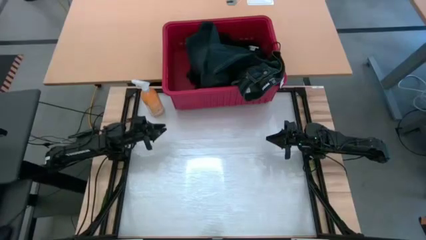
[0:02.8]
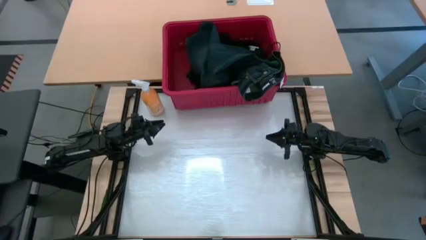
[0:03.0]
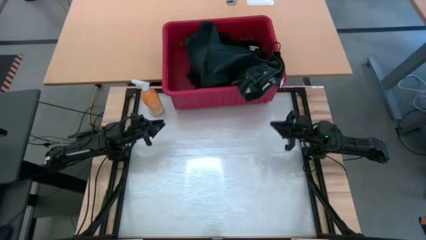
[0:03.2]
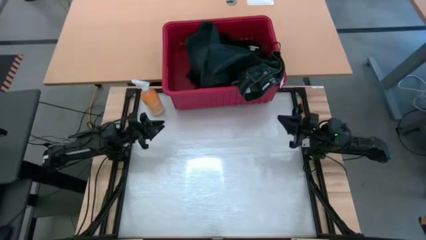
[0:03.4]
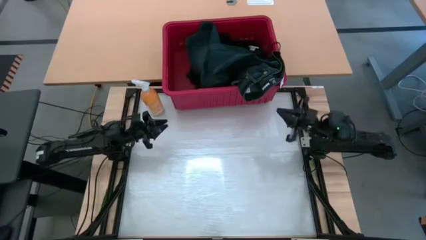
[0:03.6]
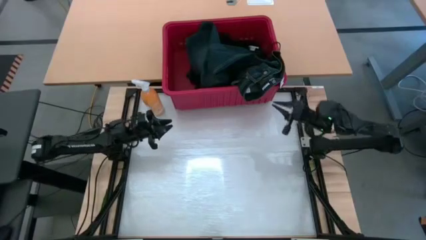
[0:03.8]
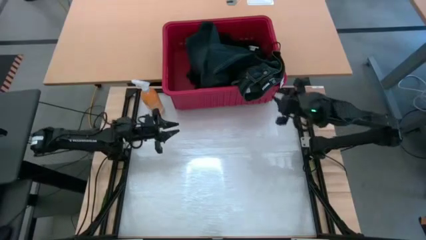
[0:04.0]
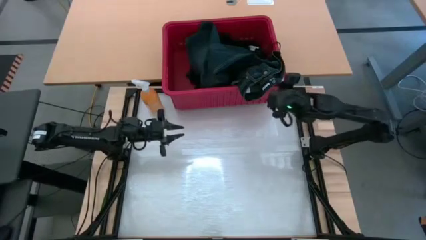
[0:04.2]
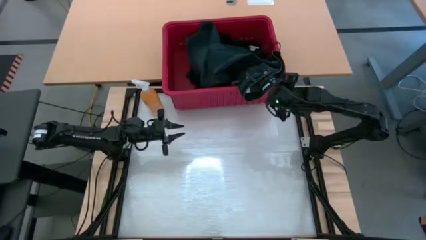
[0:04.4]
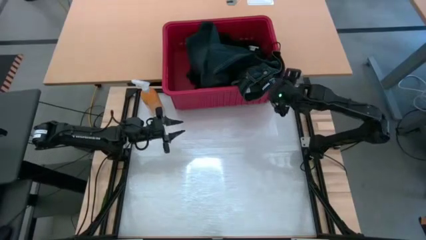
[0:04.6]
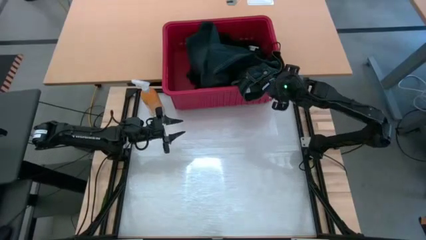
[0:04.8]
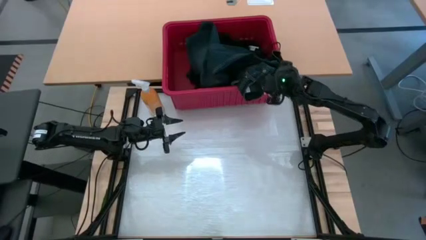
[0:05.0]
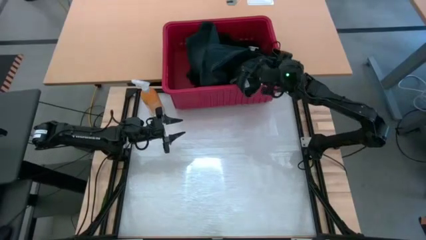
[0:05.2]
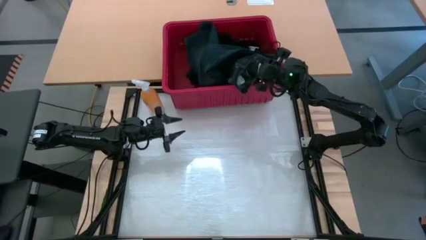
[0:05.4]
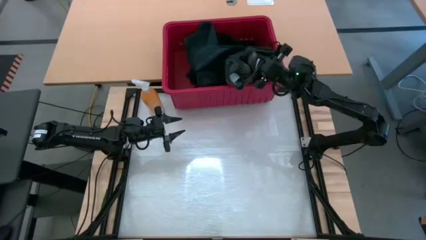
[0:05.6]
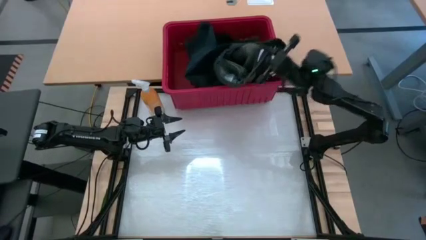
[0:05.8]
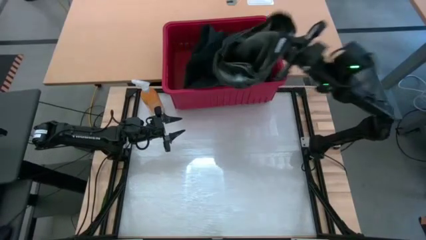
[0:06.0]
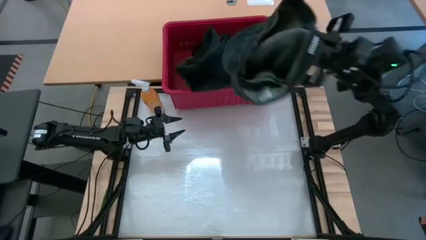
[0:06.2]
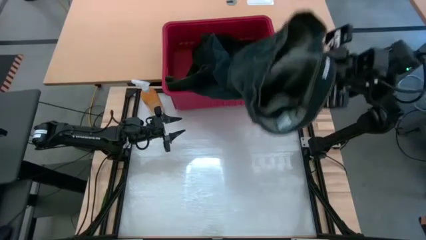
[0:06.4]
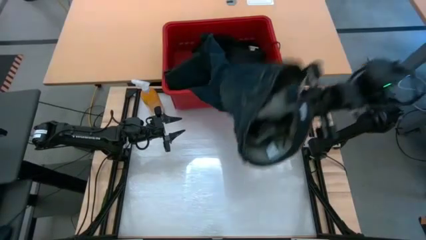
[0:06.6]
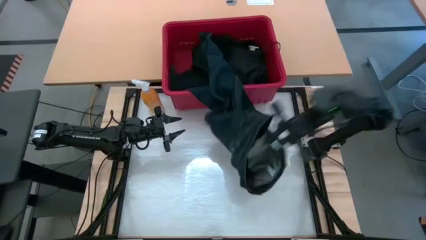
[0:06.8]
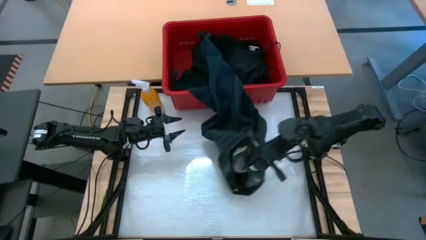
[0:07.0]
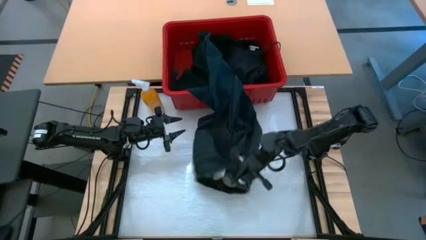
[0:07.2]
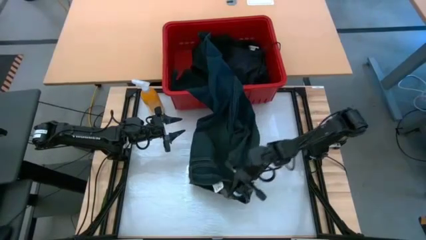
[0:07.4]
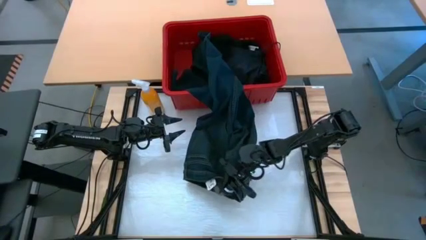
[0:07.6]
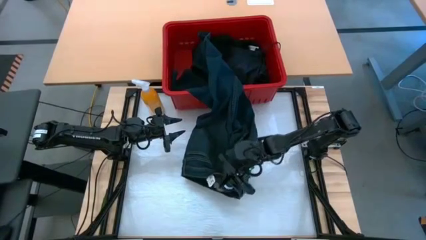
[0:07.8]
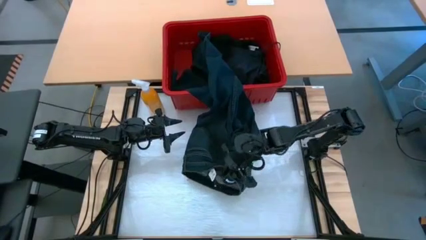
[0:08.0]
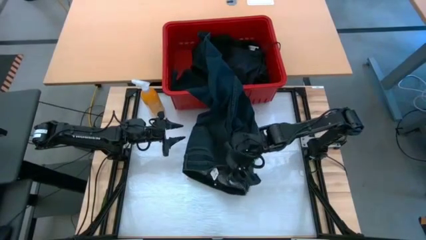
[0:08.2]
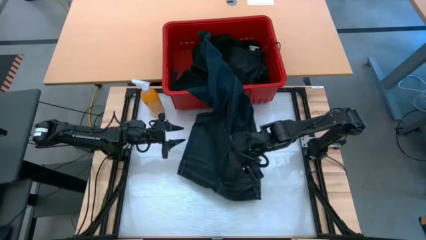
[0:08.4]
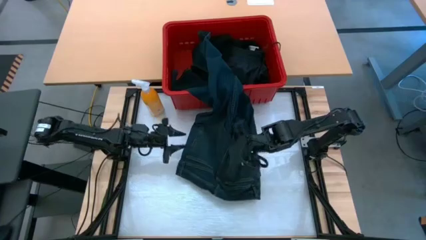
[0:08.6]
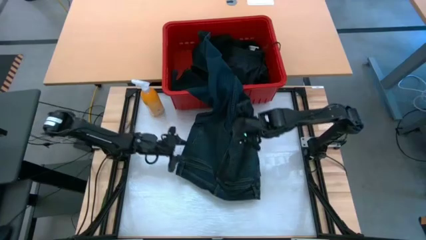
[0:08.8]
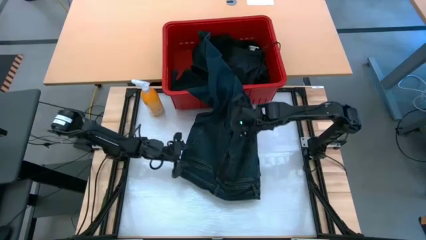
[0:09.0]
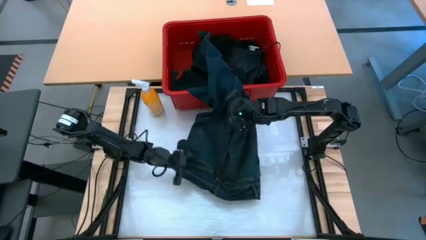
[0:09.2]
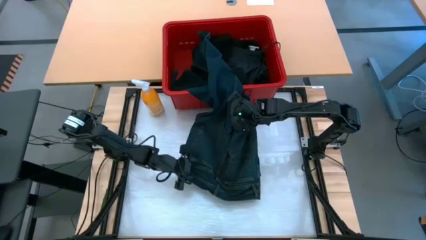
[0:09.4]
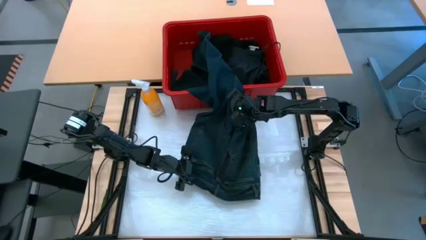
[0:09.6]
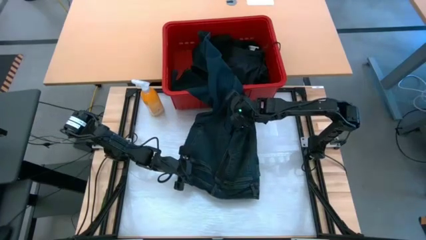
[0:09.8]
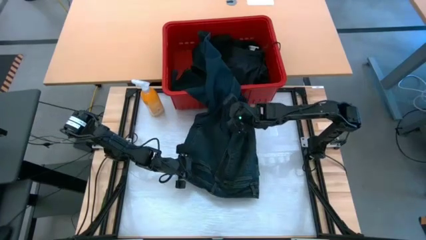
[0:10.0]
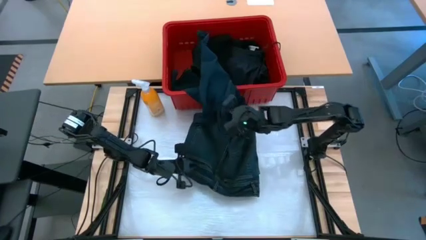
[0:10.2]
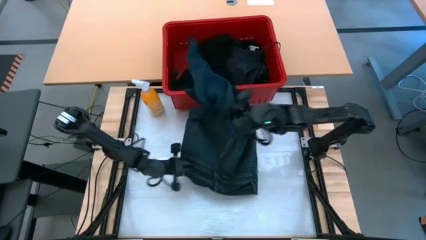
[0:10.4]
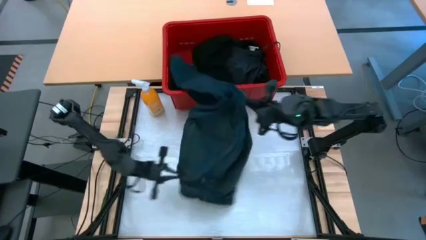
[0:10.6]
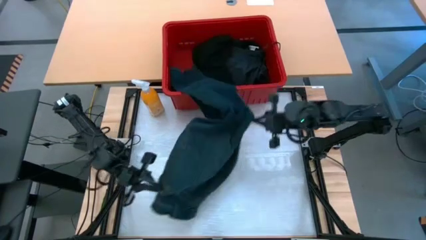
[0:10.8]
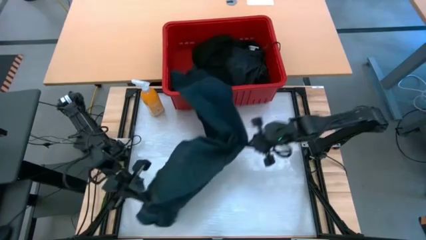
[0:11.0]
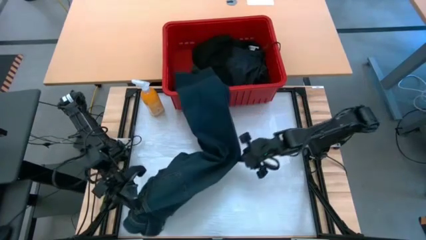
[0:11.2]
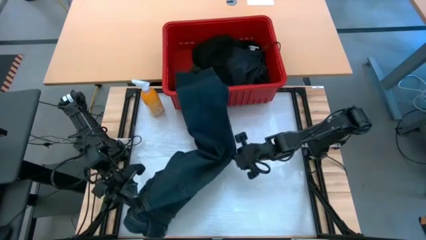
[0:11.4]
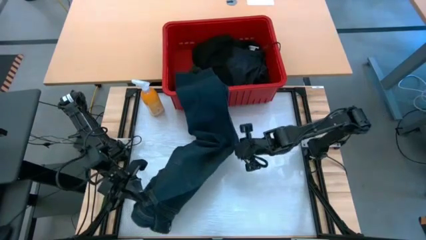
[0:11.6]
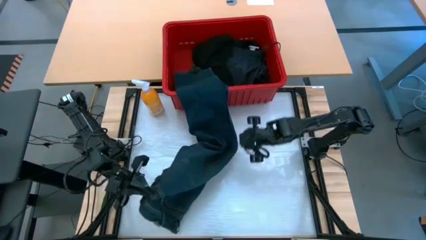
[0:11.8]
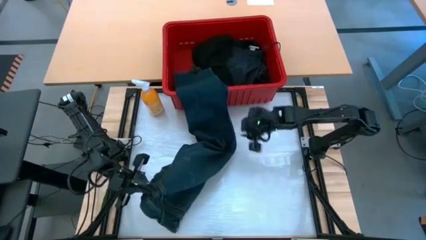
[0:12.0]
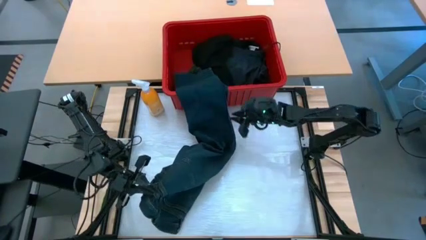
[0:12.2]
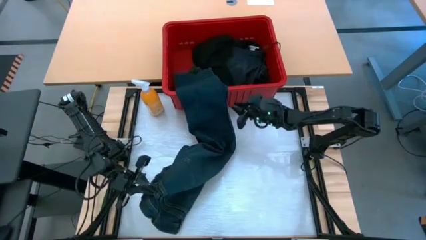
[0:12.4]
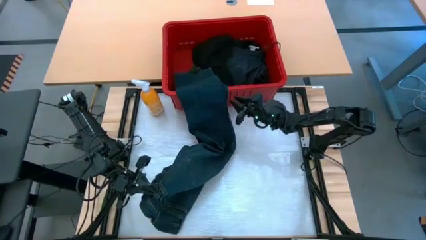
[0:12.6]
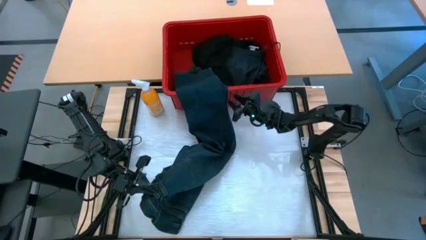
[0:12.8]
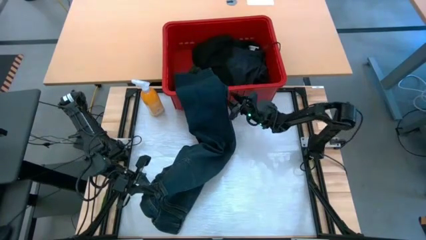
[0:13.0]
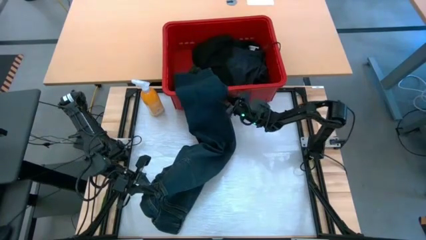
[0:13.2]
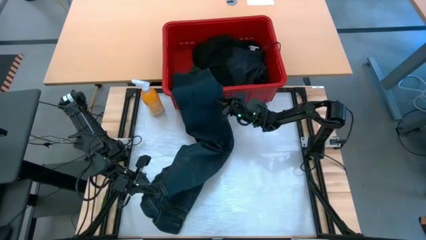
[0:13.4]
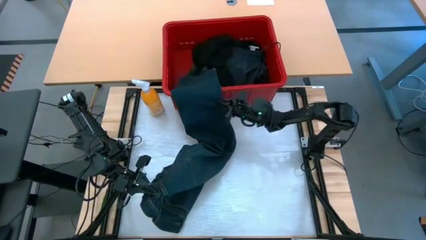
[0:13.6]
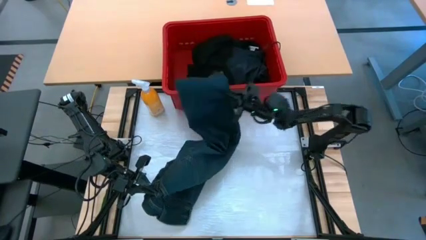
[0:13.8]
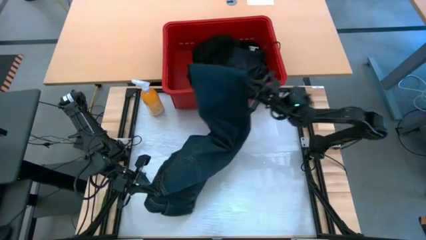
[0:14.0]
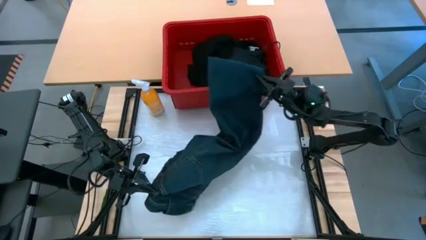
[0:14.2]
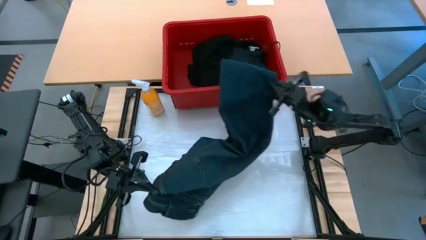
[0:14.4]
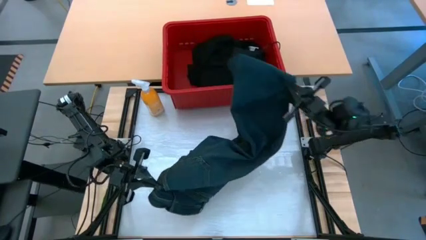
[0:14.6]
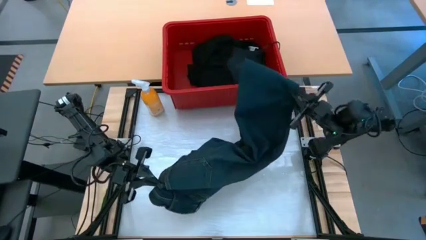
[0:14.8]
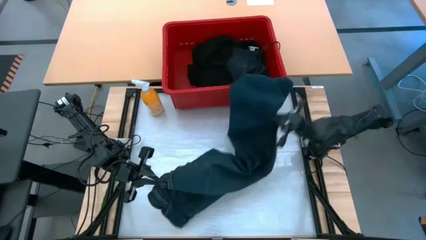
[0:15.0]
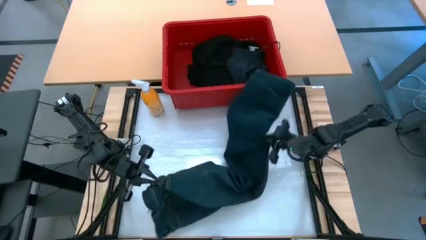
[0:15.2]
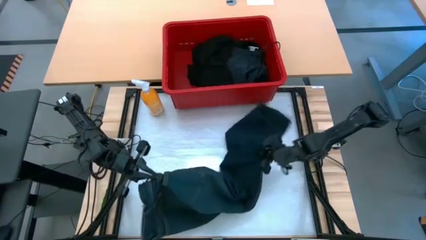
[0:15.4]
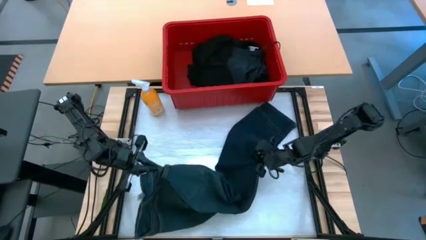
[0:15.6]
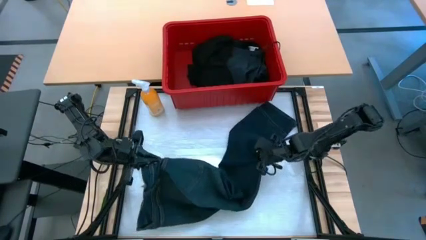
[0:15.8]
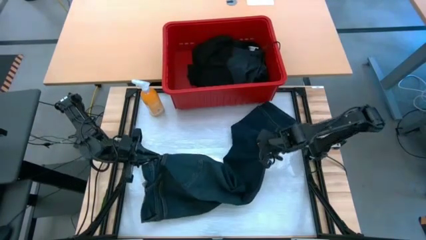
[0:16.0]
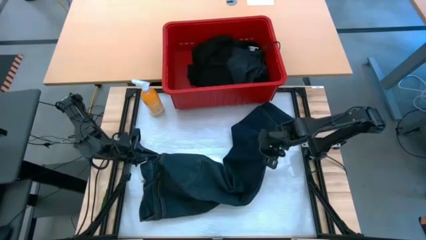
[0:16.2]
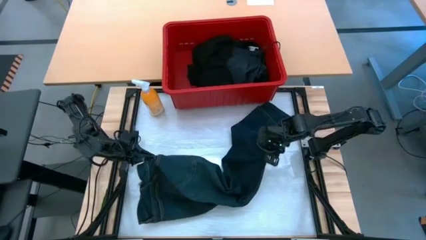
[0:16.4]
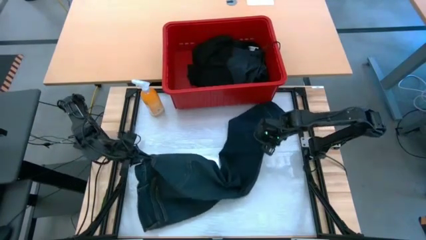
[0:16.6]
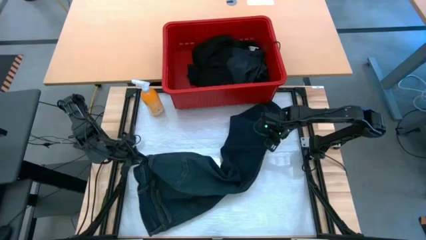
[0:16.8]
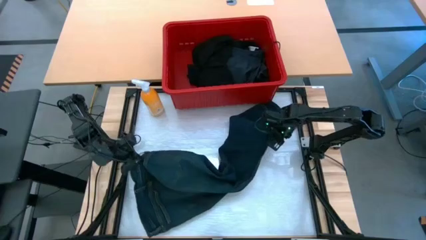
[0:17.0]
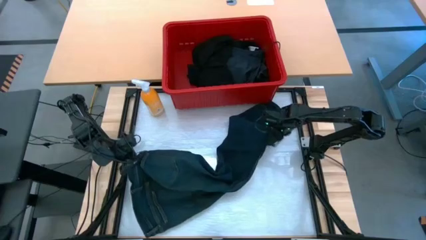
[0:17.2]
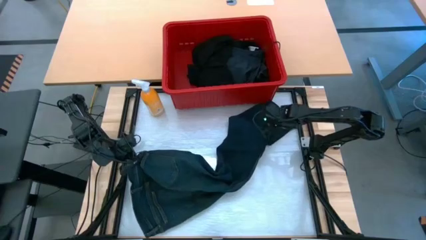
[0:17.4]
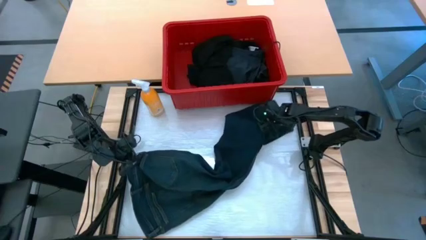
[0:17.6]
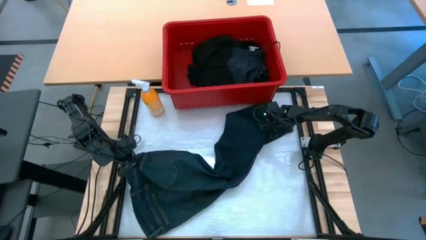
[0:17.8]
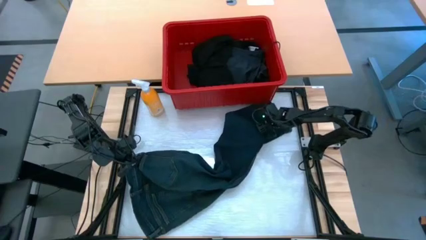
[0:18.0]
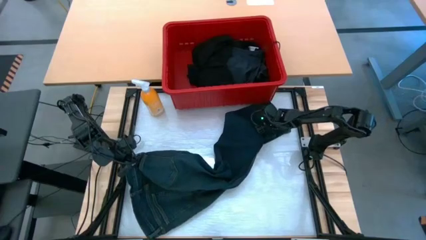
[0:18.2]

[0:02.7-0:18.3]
Task: Fold Laundry from Bin
Remove the dark blue pants from the red bin
